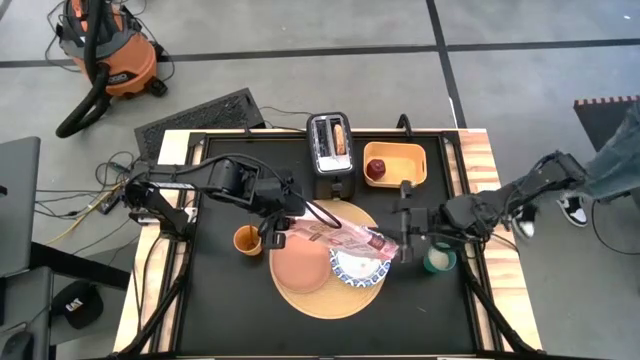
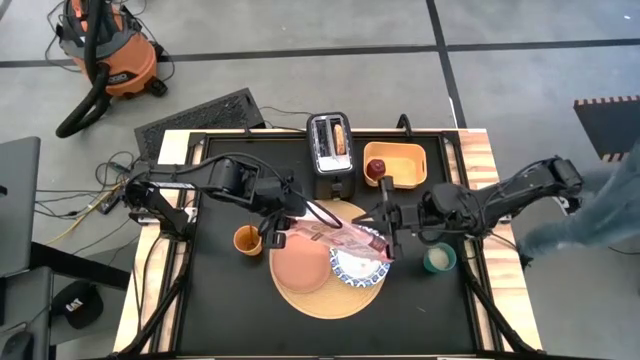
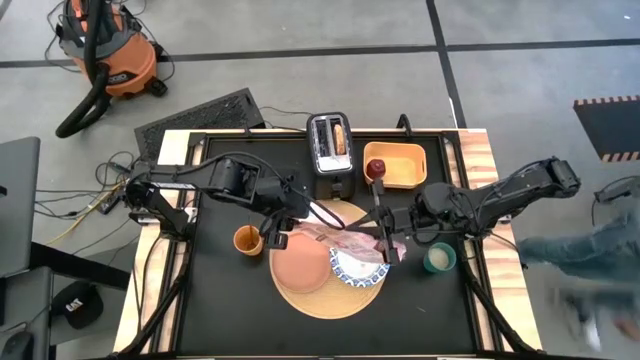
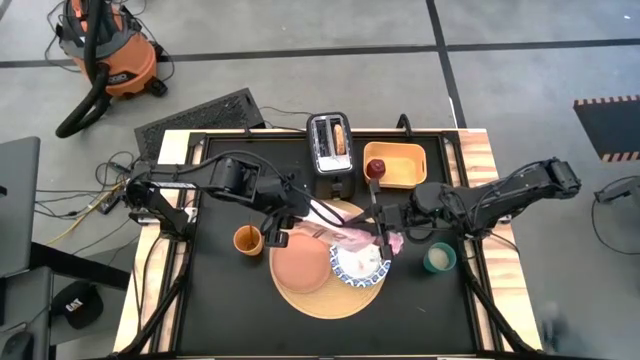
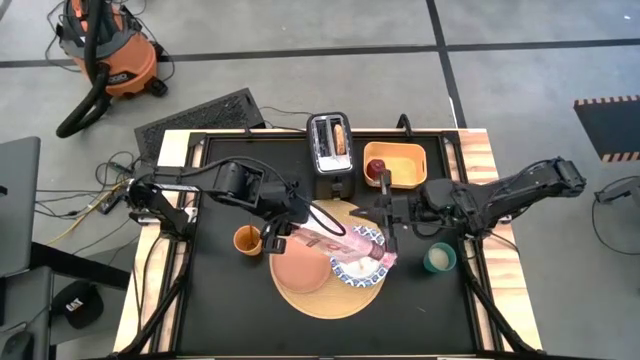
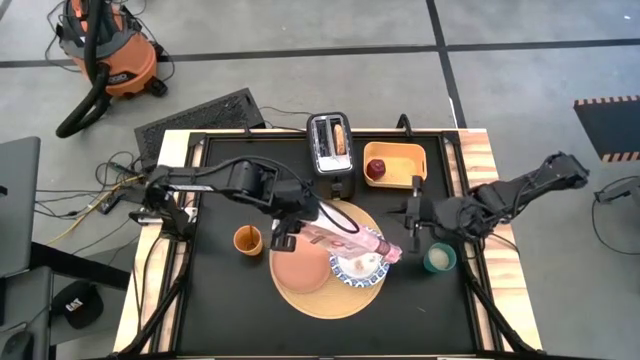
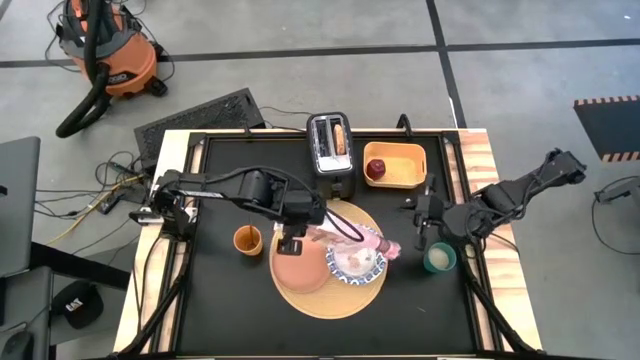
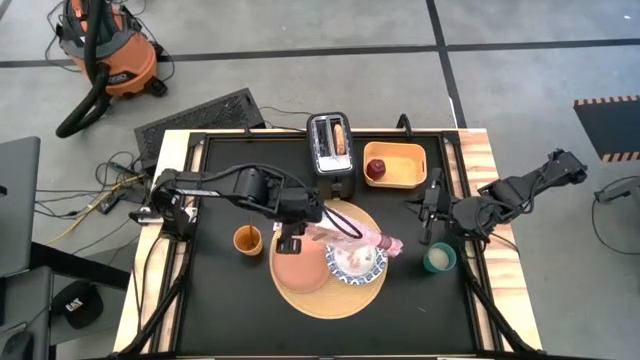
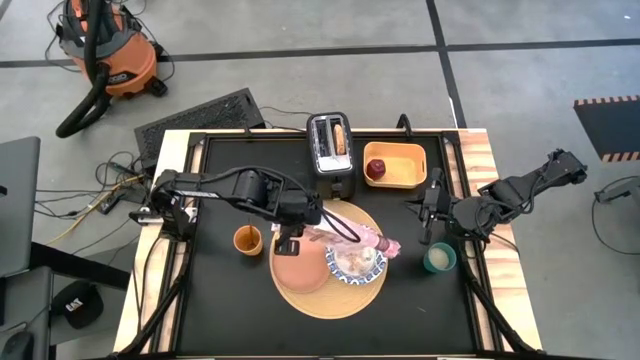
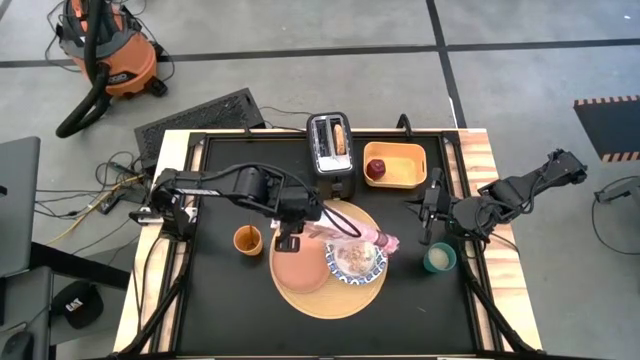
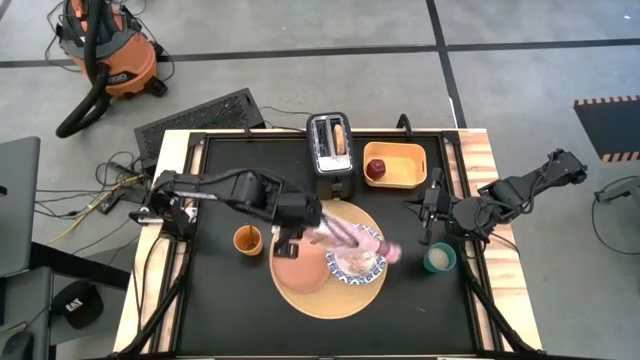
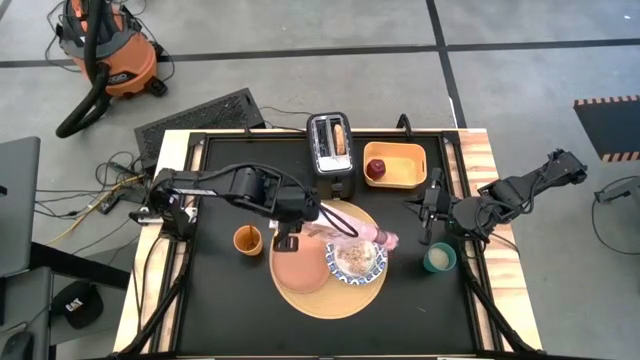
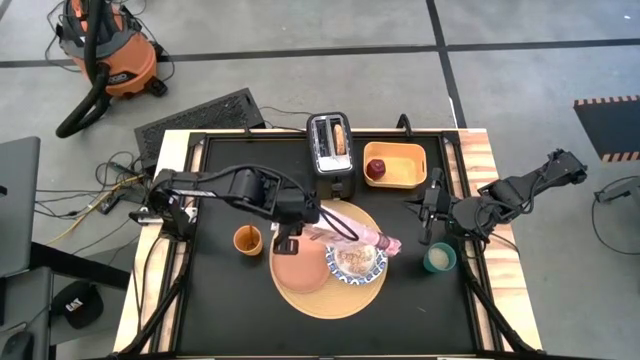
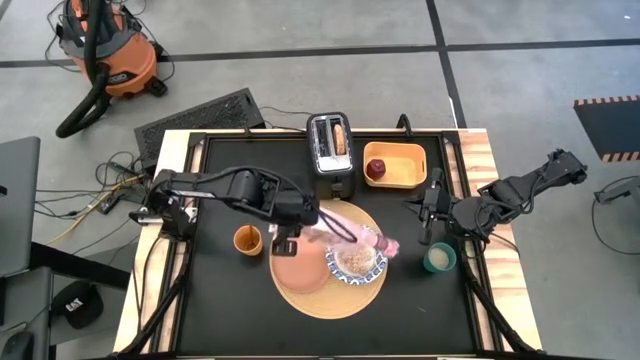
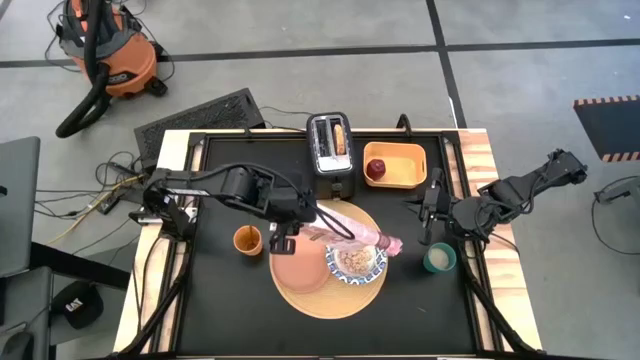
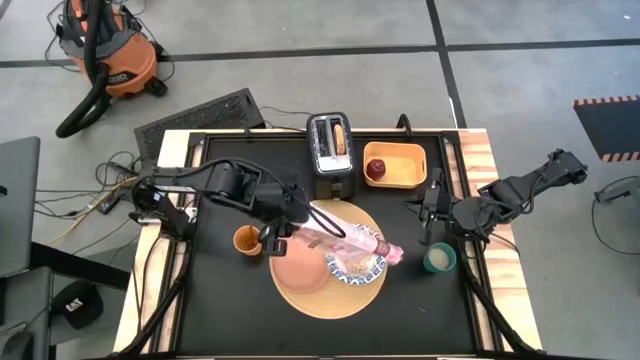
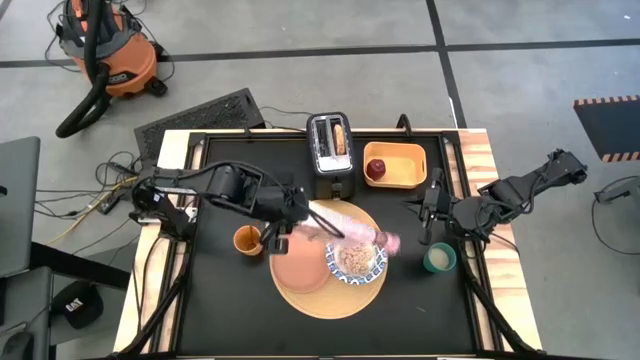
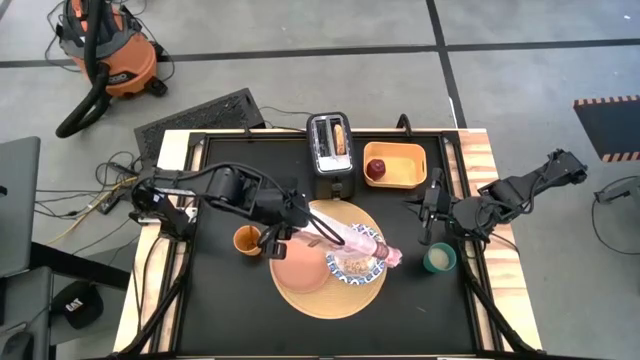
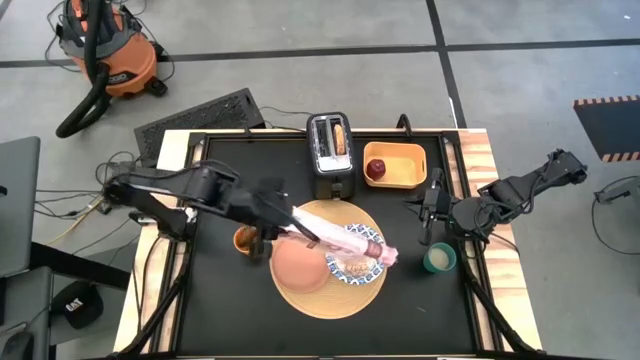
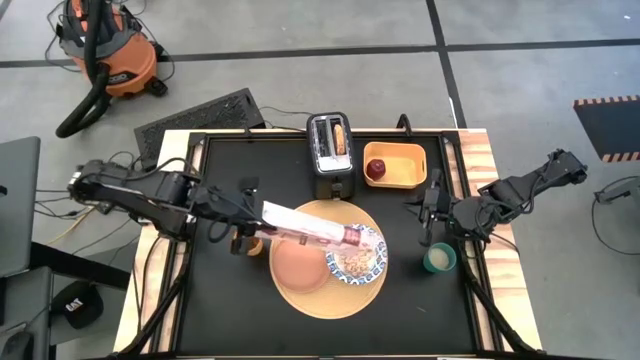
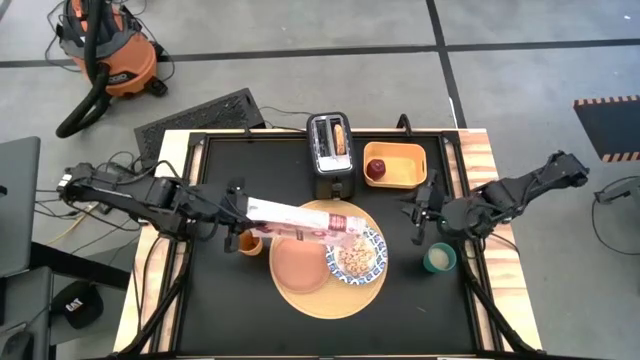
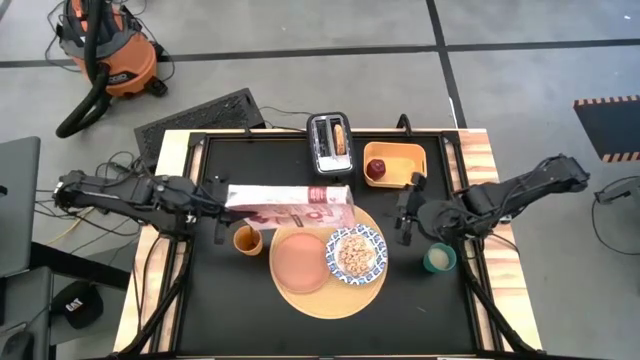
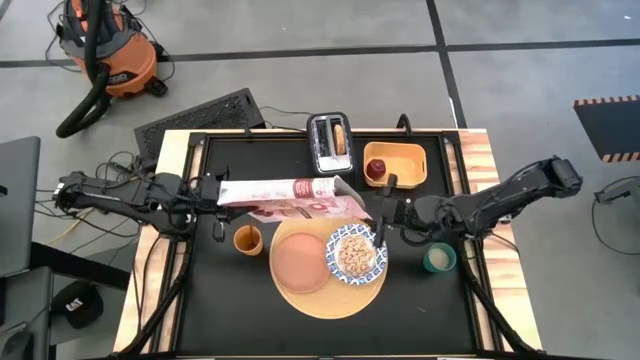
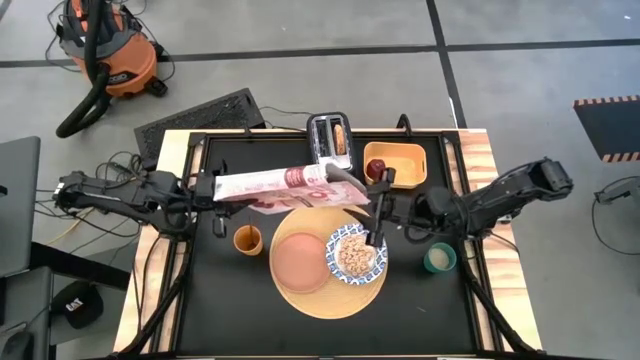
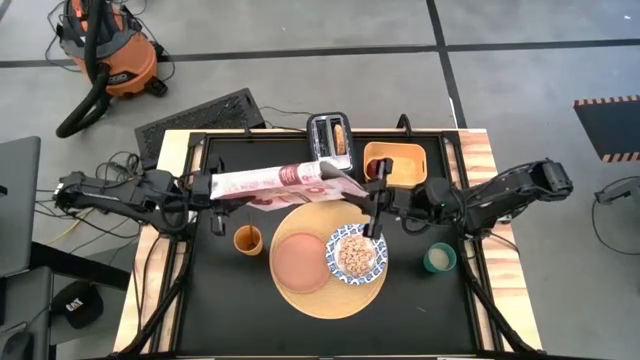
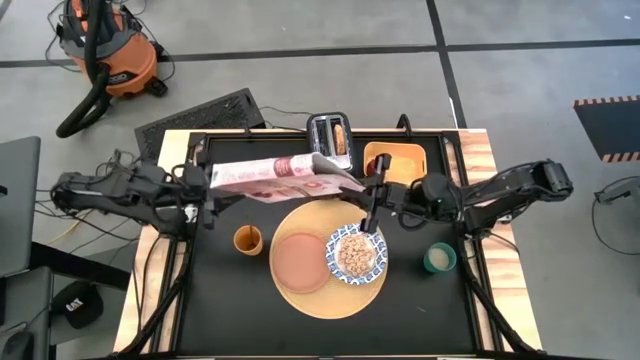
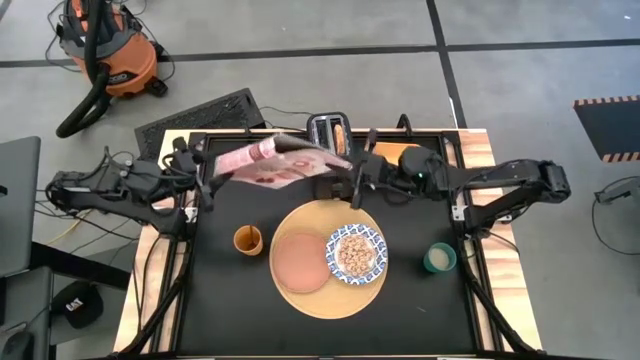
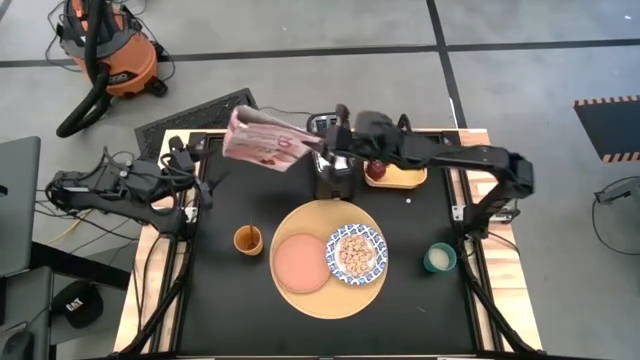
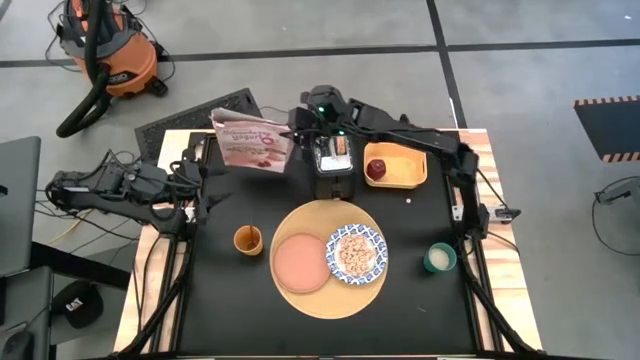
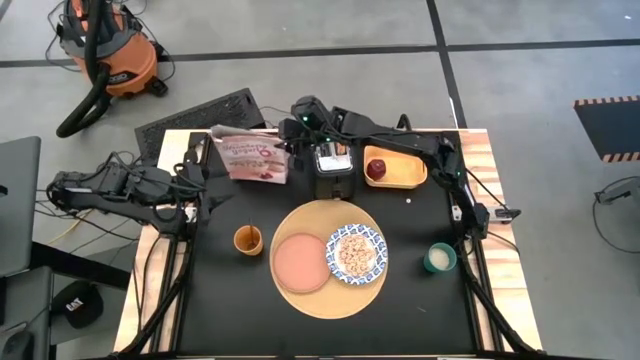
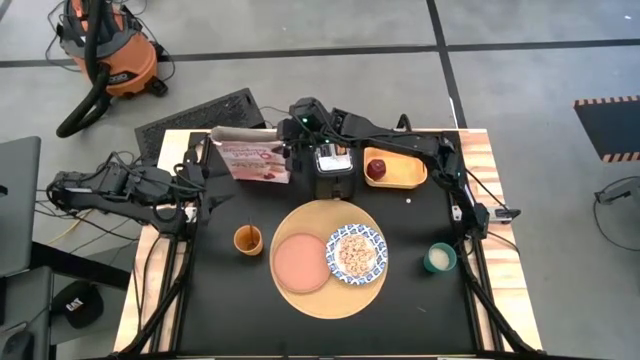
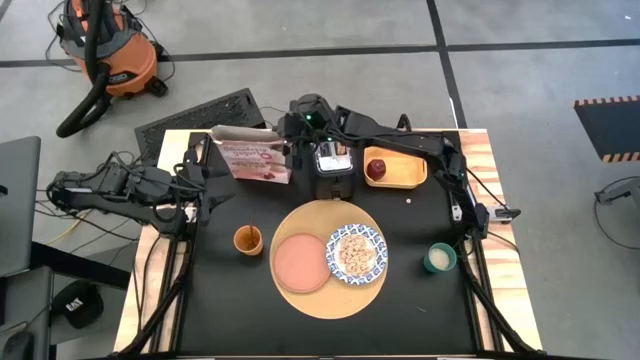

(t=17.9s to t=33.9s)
Task: Arrange a breakfast setting
Put the cereals into the bowl

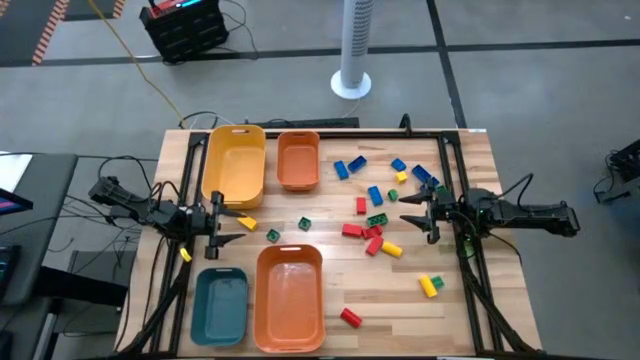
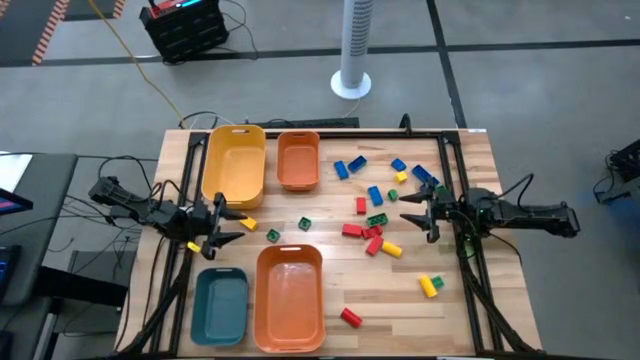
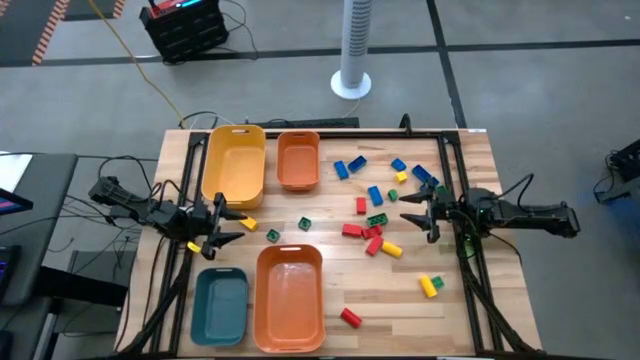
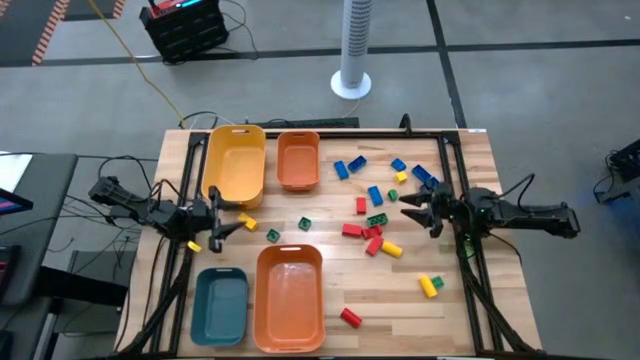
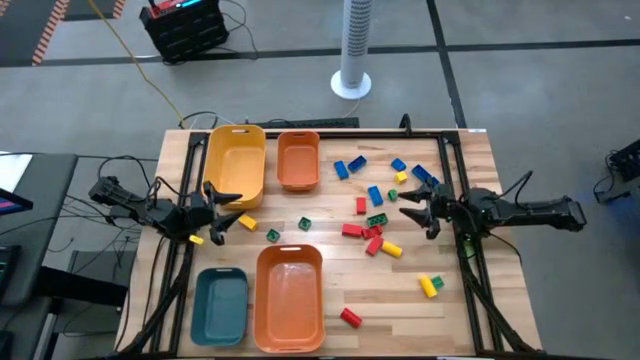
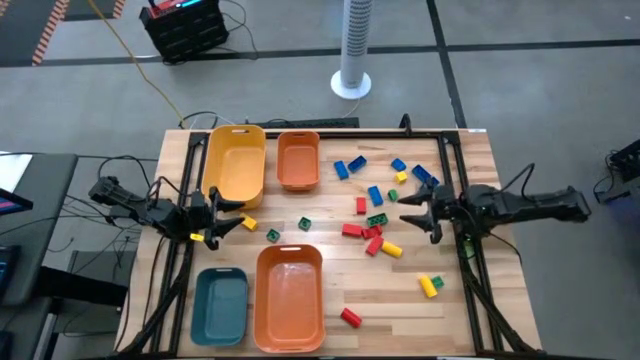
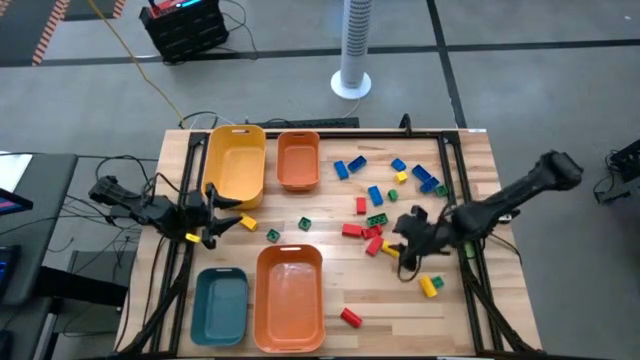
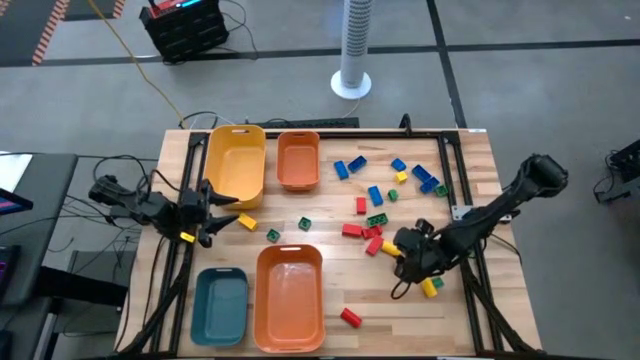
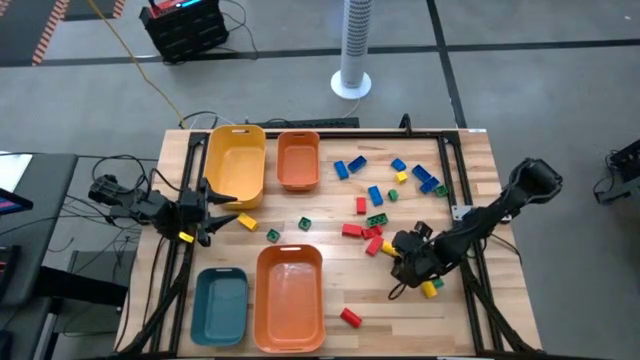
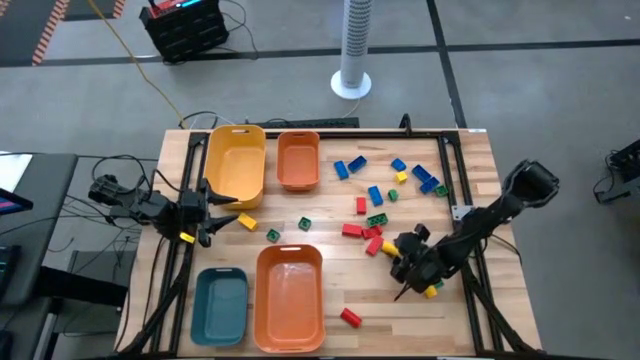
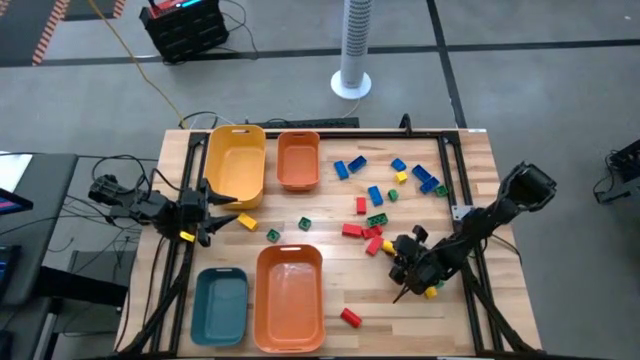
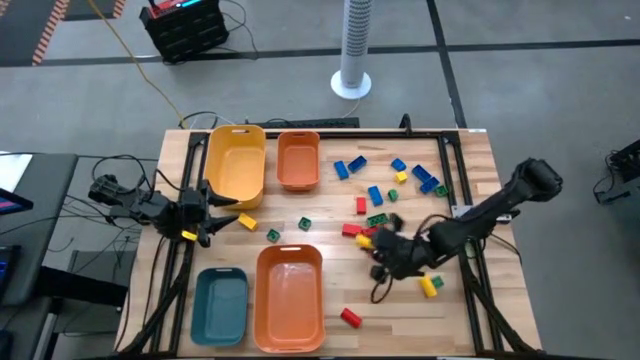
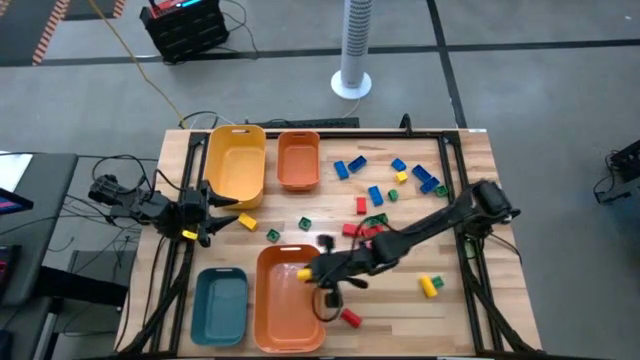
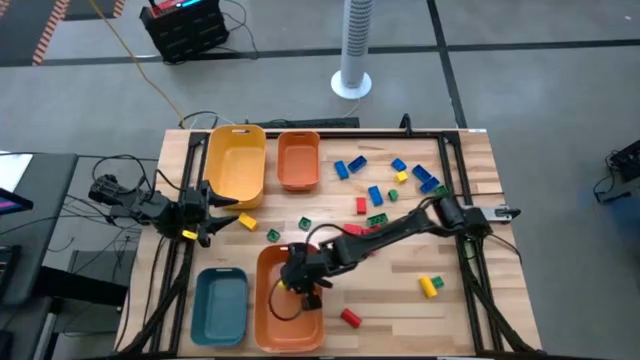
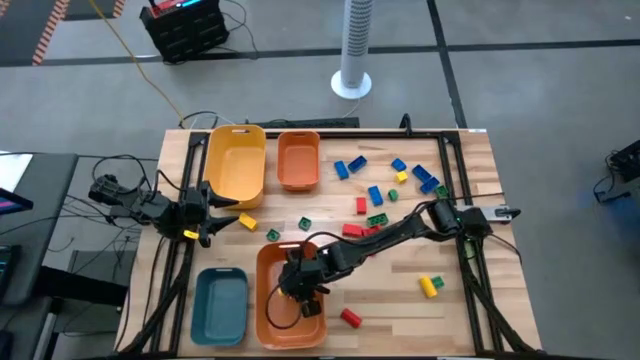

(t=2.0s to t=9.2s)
Task: Sort blocks
Put the yellow block into the bottom orange bin
